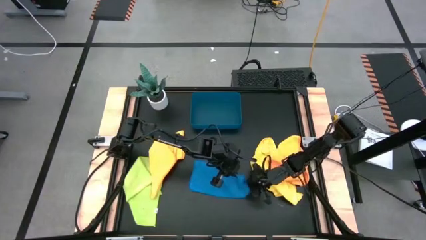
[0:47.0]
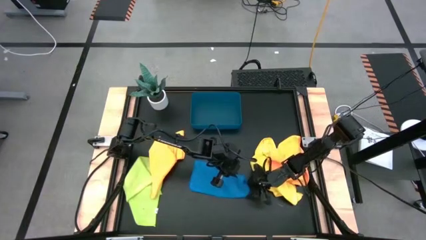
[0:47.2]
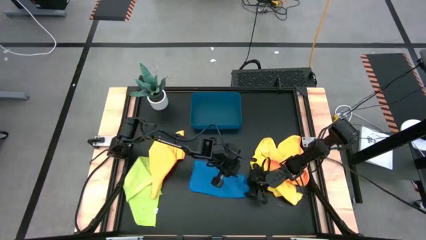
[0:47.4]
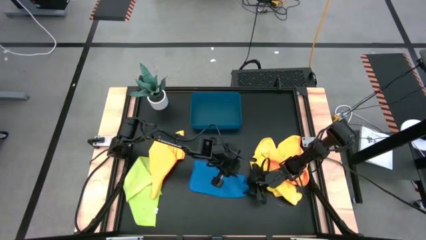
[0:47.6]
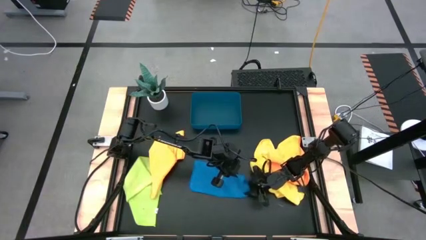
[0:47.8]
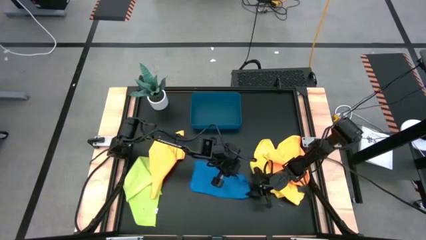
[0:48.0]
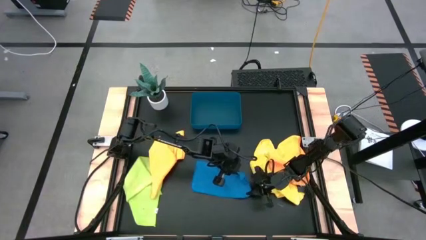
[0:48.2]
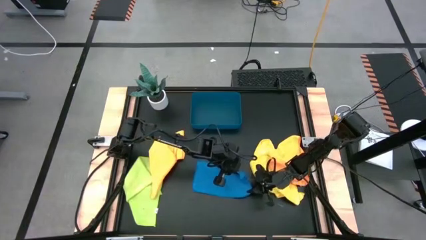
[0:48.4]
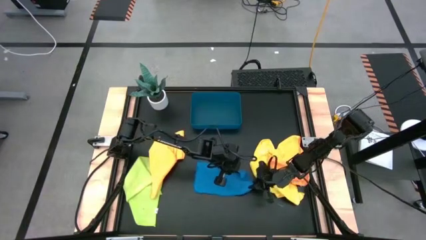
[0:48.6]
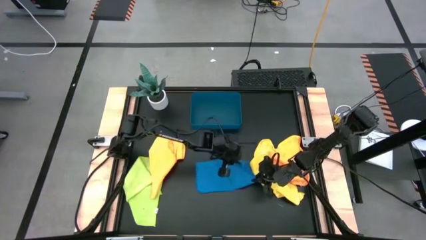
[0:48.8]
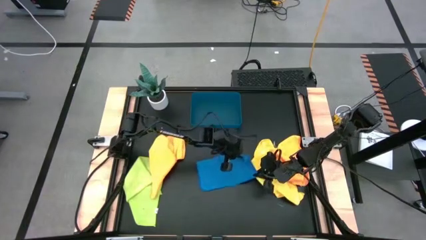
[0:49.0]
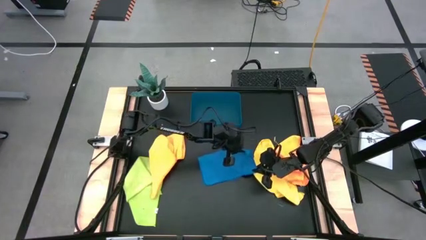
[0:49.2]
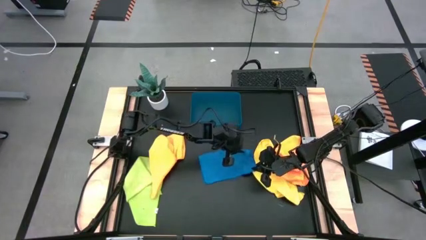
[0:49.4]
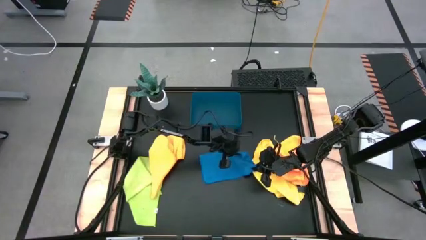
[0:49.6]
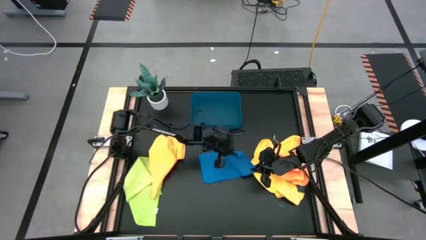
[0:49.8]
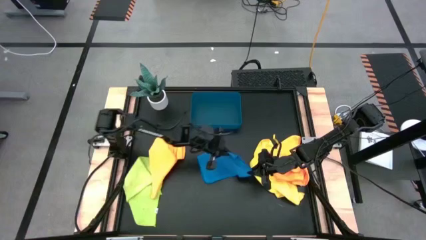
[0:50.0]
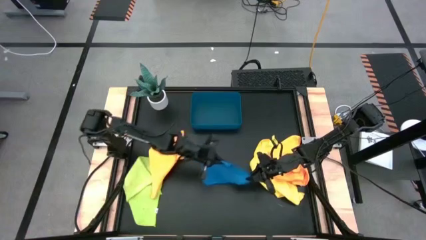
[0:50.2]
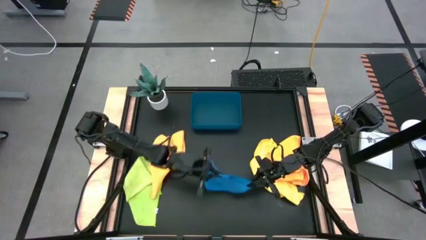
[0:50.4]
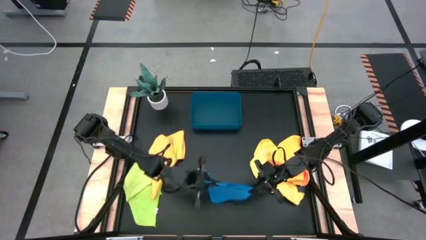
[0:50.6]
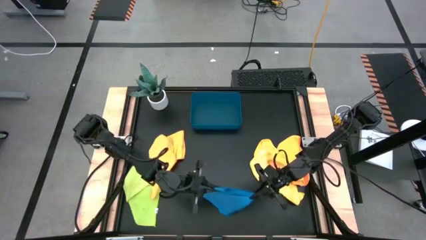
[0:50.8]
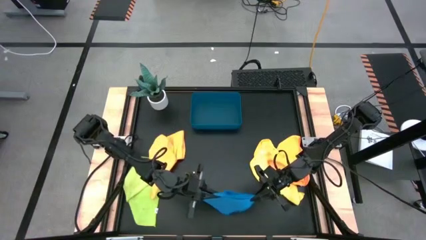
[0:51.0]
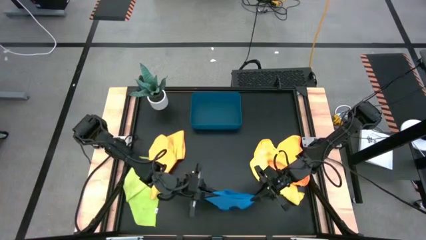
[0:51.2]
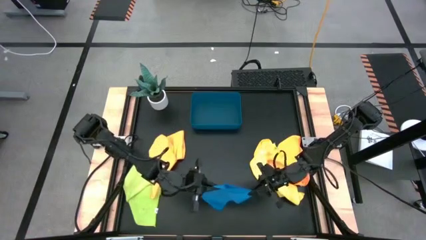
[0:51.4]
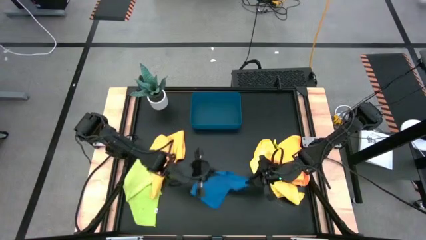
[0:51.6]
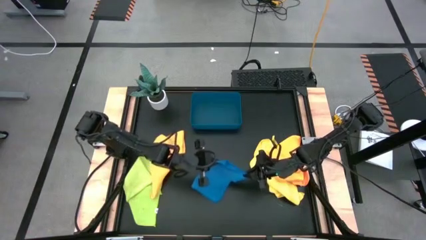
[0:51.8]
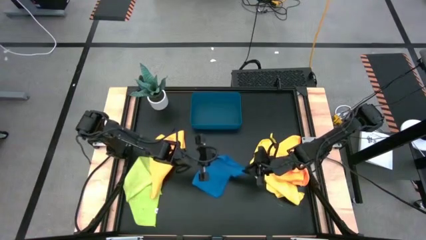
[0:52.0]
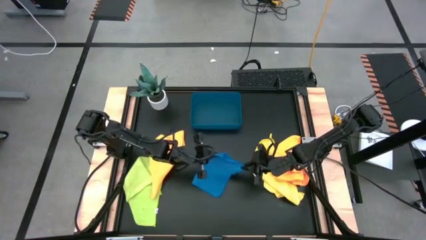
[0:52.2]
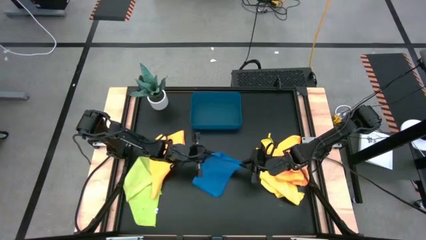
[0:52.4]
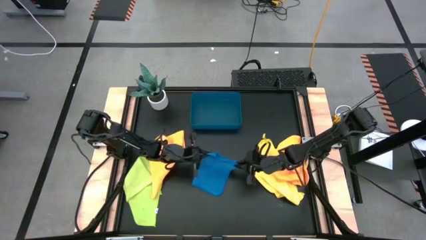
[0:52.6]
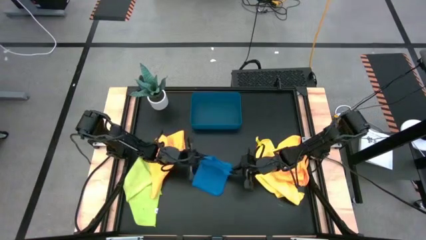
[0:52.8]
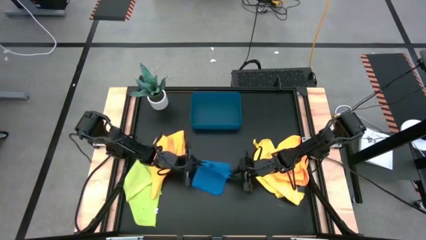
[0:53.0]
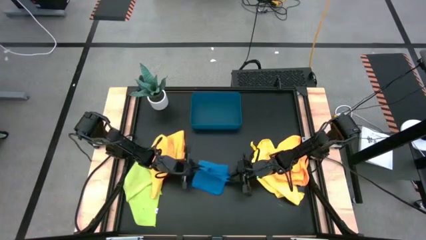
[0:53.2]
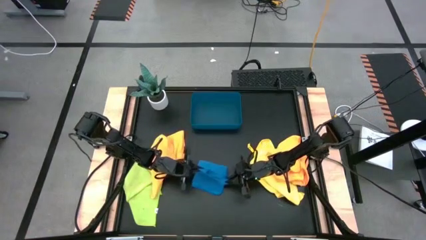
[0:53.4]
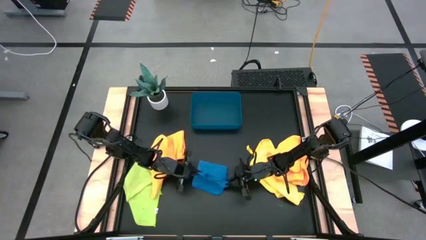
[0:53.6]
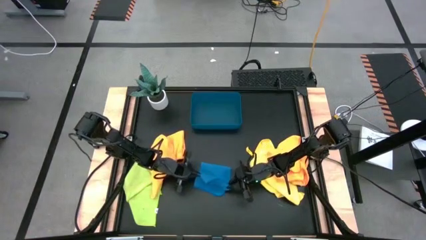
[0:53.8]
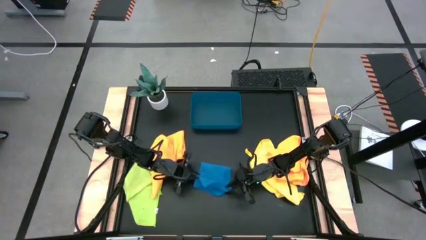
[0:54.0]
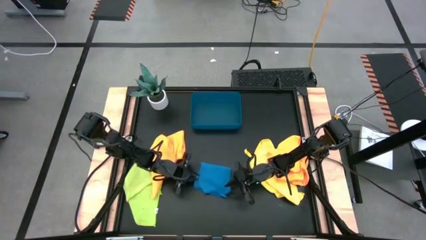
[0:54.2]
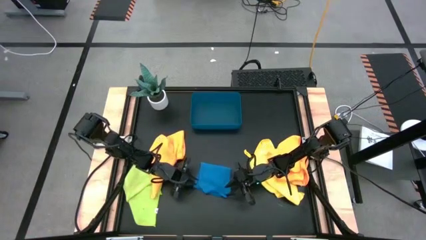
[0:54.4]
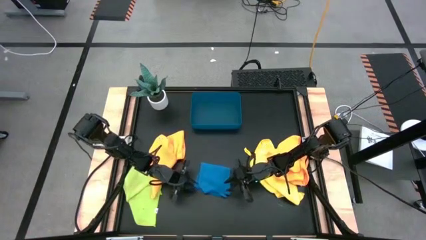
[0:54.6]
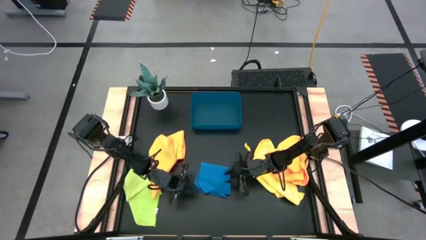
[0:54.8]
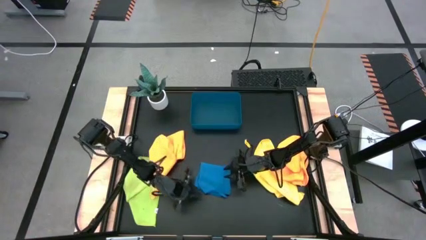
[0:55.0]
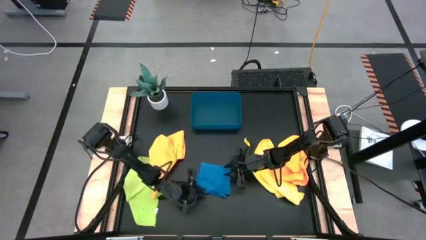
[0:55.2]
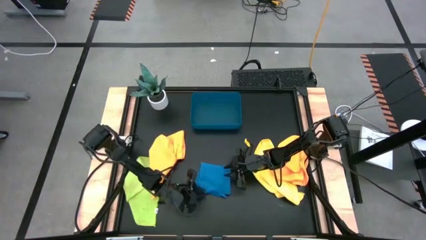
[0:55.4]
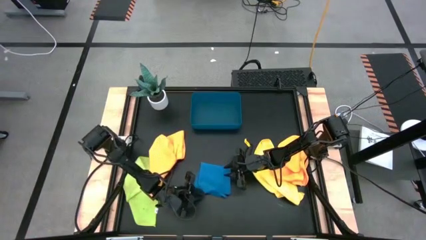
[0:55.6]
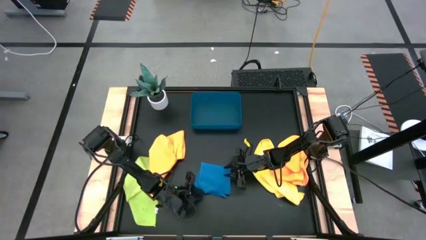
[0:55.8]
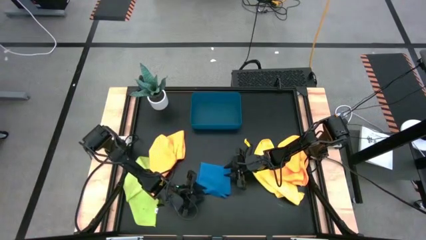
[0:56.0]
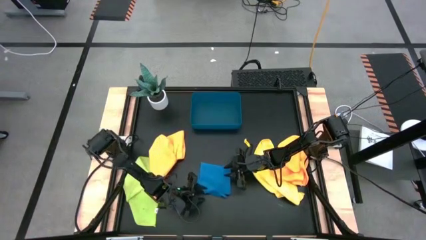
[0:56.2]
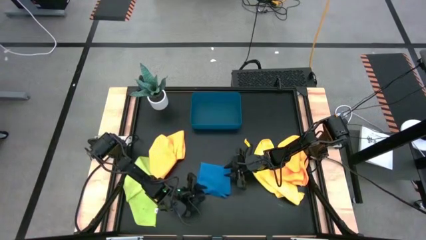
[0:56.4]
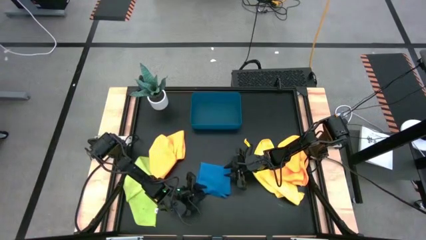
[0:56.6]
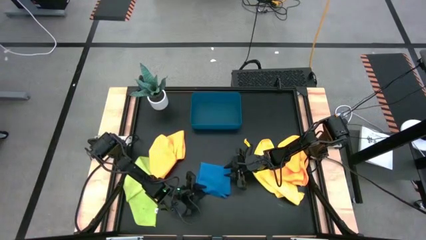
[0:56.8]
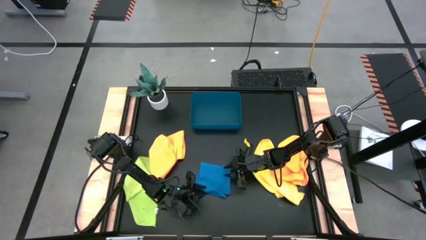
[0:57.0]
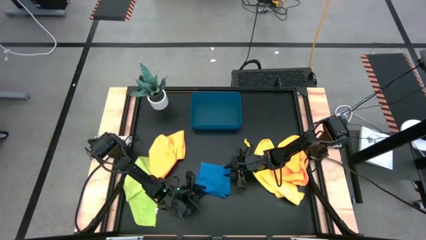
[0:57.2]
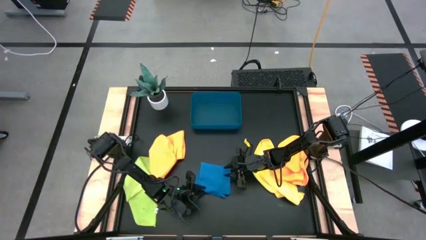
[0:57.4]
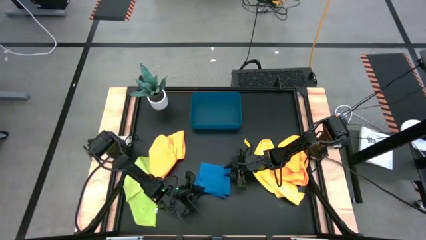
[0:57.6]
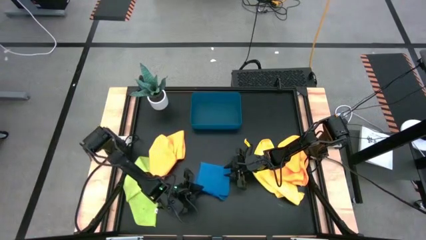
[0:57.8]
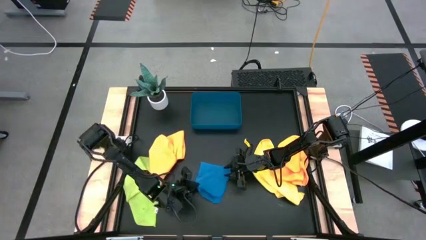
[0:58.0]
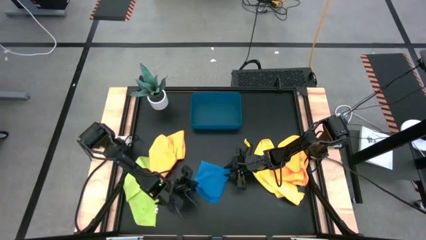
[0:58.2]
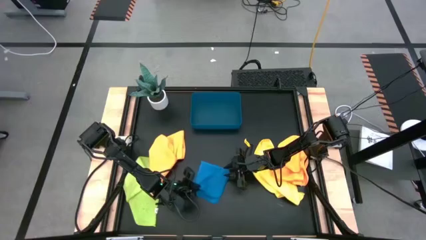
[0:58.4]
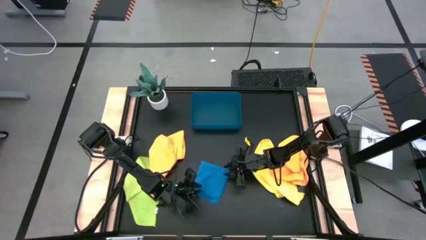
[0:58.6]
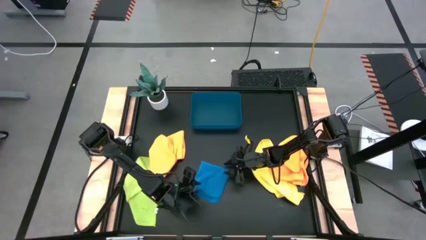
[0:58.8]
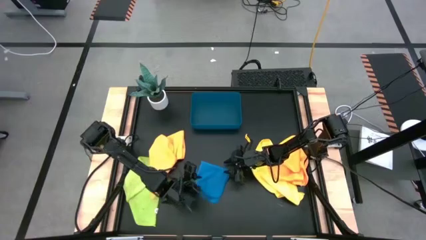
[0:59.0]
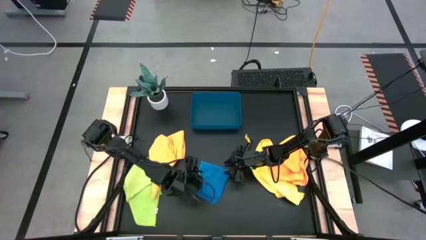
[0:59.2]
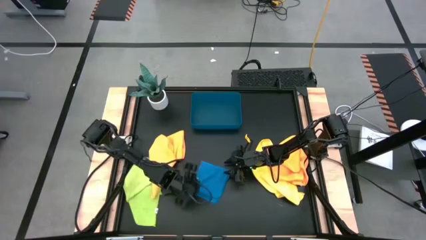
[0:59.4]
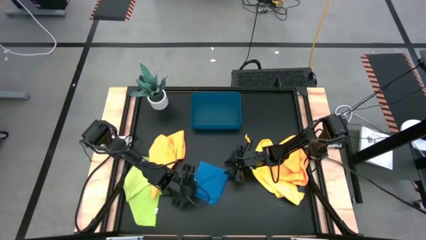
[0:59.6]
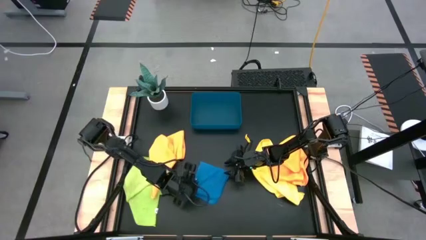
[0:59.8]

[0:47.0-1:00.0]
Task: Fold microfiber towels
Fold the blue microfiber cloth
